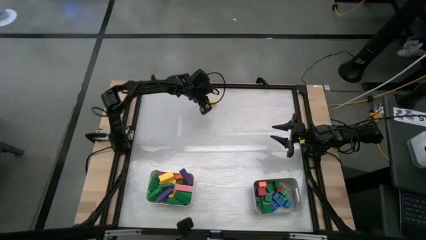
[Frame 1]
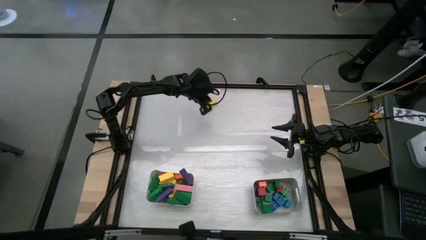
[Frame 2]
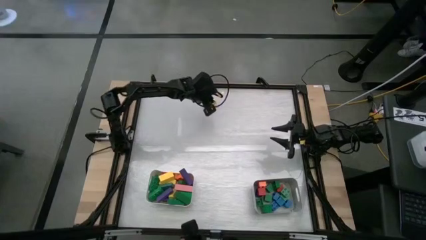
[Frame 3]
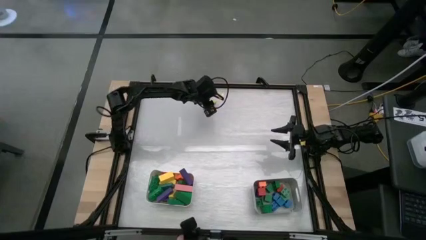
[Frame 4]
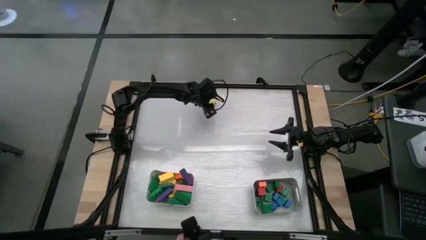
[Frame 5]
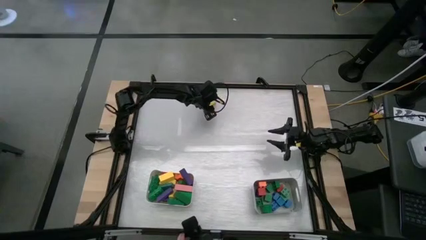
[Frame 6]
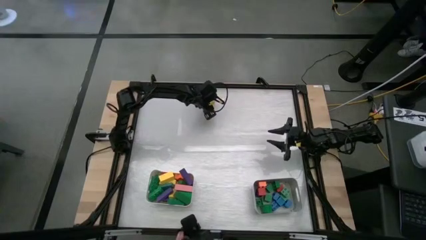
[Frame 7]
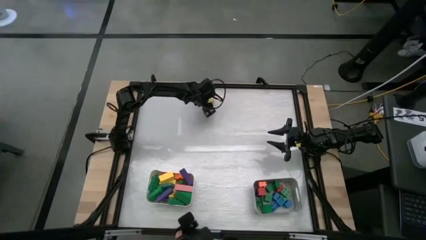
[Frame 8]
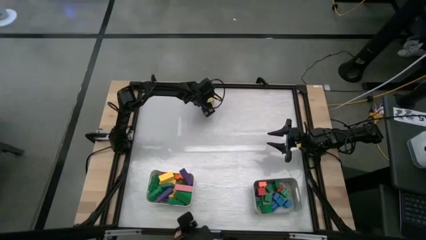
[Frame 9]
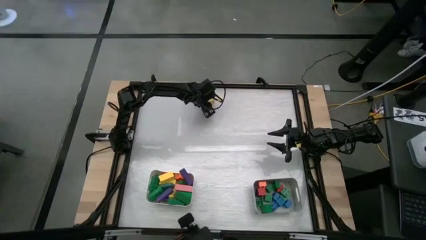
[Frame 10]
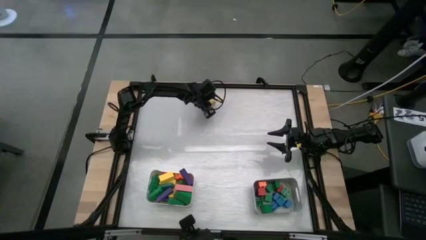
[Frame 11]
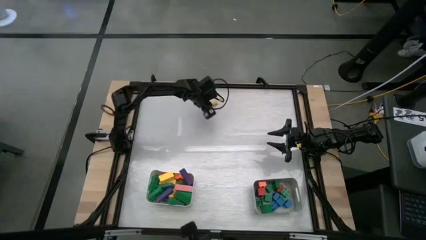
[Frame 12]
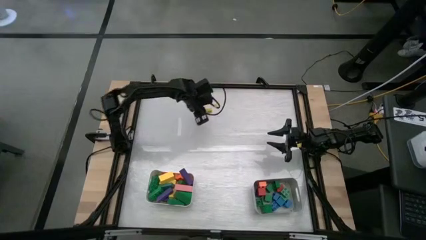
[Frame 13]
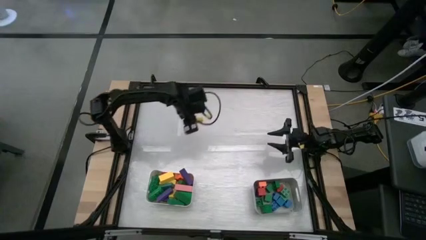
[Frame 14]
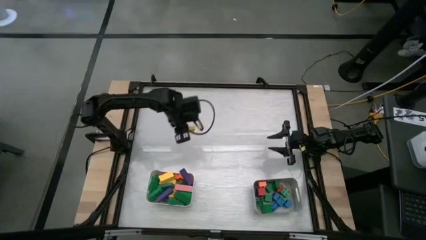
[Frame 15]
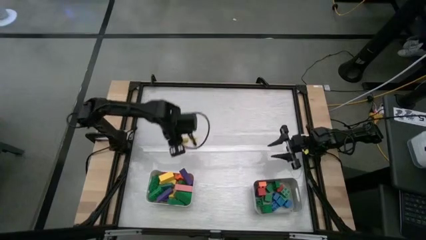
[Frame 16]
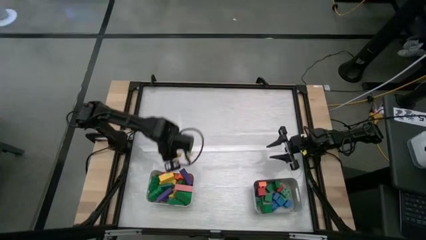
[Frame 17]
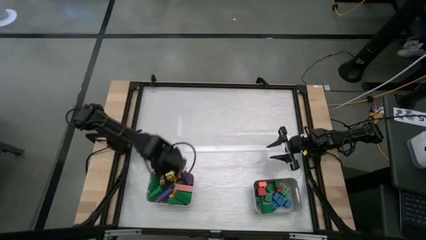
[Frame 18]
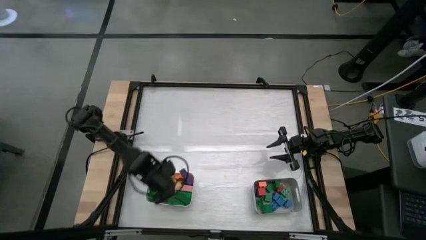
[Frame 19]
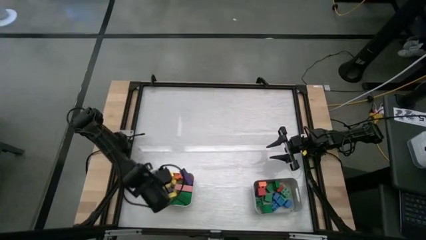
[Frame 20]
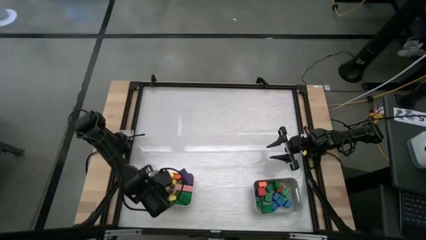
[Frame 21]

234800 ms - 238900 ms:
Task: Sort blocks by size
Put the rectangular yellow block into the white bin

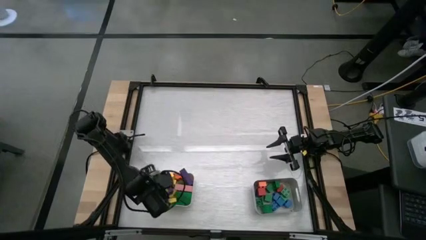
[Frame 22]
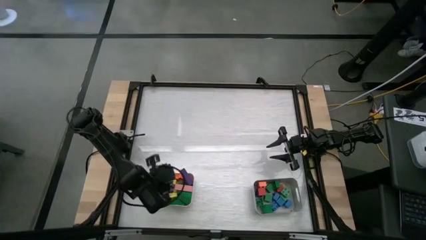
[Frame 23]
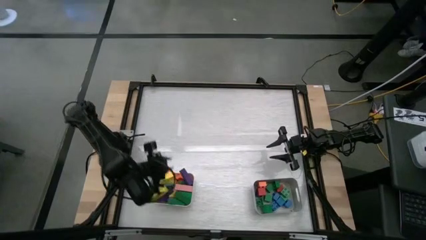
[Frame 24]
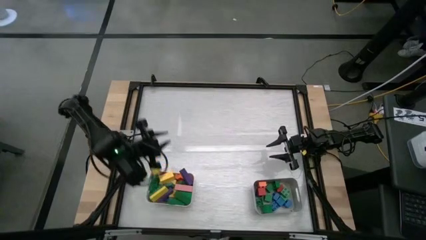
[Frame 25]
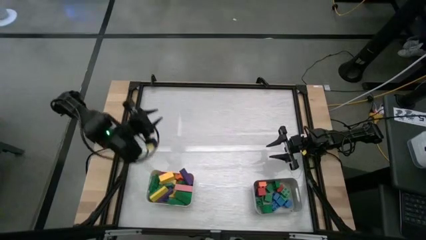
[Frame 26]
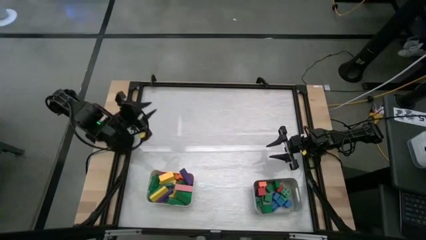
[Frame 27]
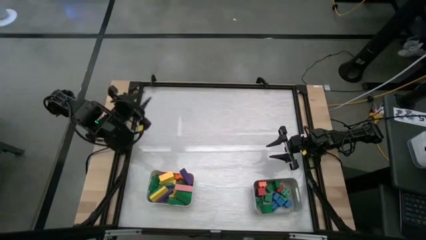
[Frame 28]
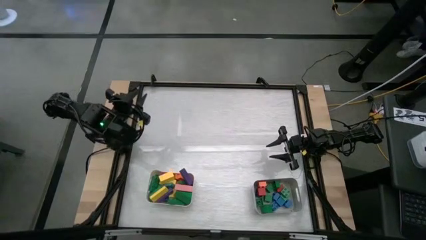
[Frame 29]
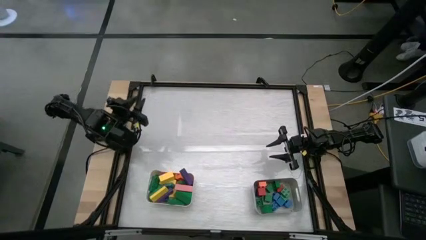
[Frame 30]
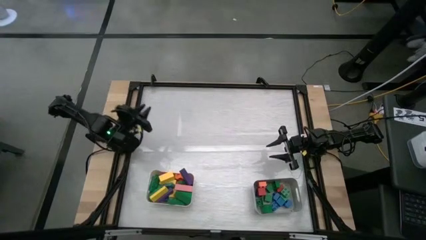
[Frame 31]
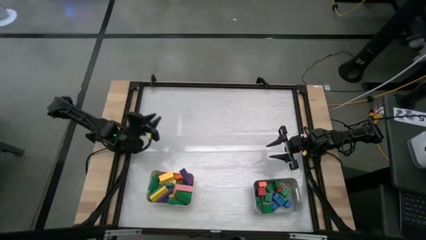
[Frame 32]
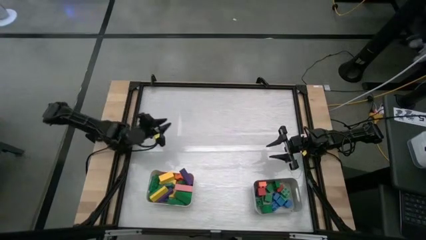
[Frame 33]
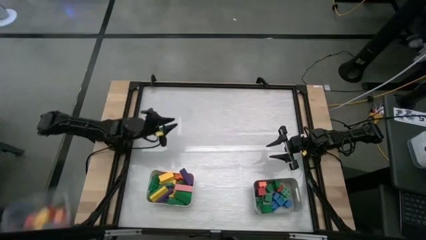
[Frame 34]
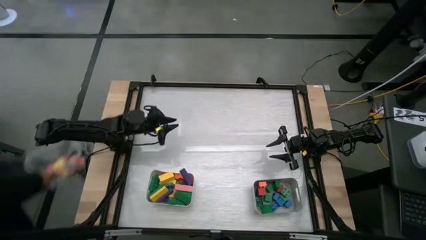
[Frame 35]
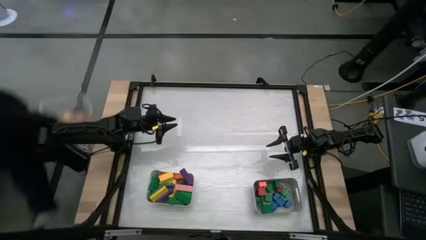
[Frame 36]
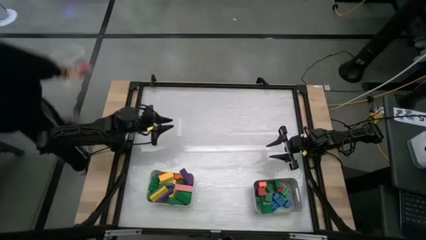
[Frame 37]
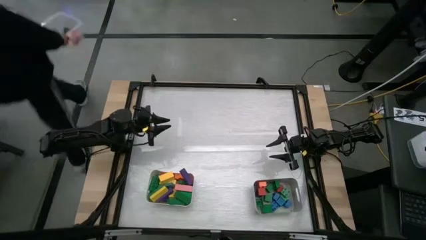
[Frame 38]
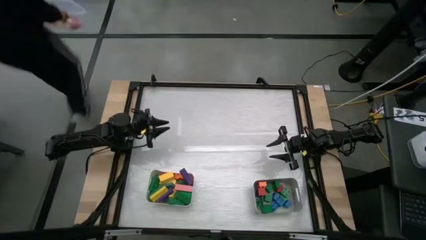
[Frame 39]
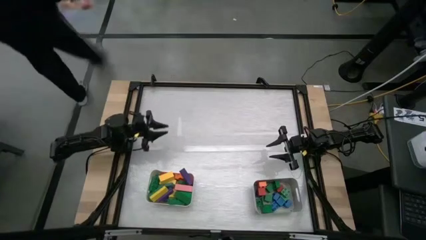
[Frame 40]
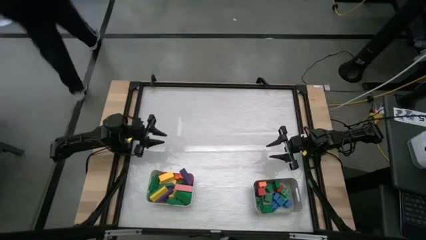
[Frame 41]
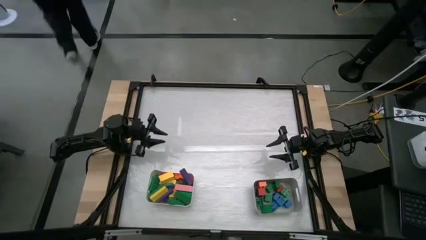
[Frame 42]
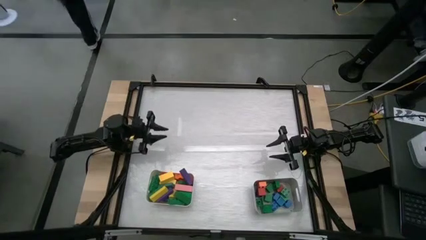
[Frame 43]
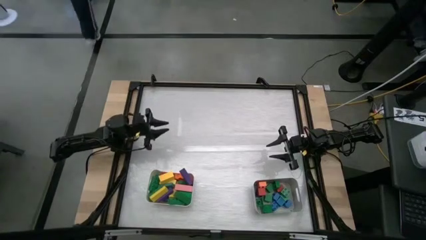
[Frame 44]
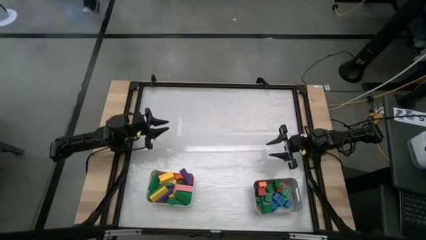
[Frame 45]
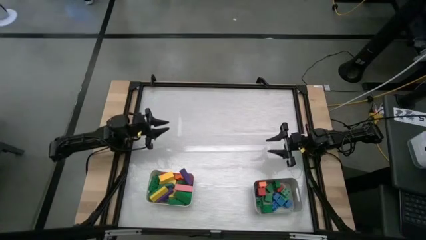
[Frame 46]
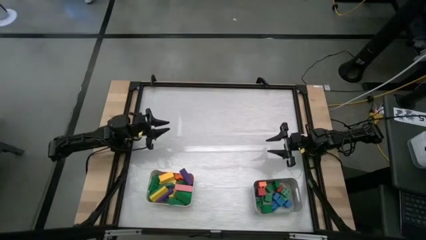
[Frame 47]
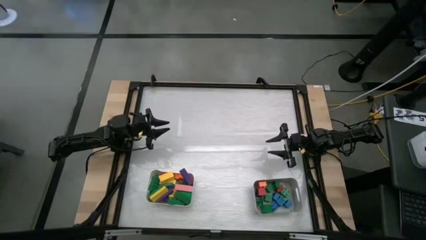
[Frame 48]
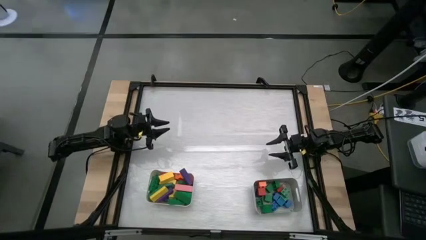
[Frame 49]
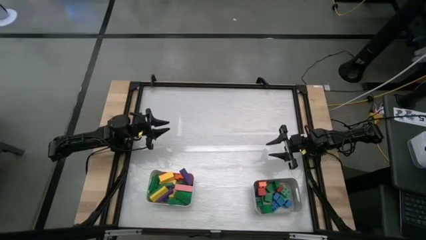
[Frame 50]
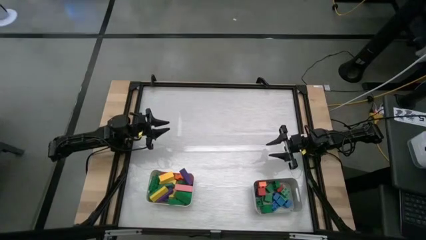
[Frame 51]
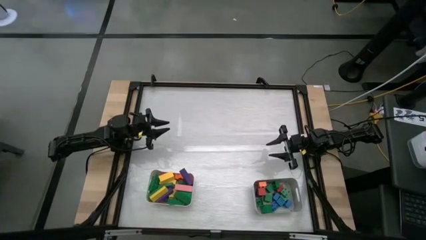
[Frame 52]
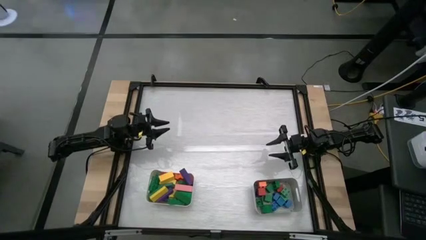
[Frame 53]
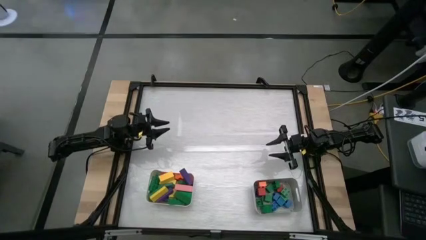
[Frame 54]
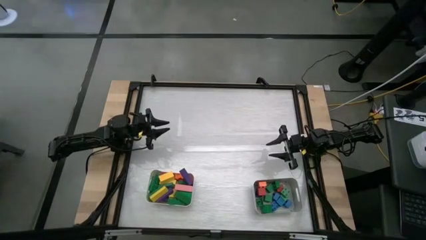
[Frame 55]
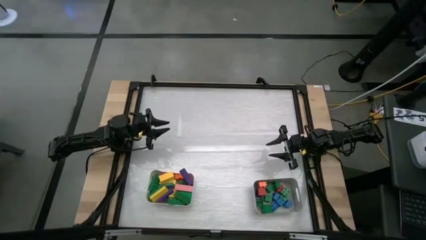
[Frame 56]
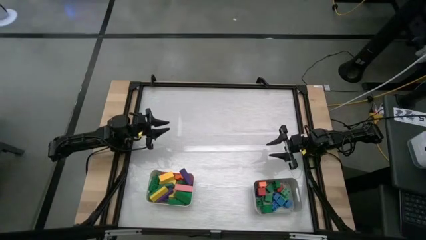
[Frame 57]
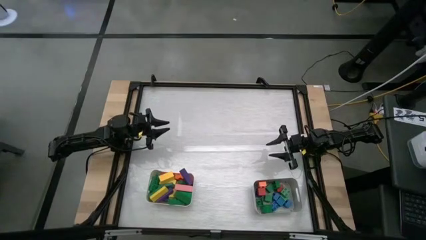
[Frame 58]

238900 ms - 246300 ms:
Return to Home Position

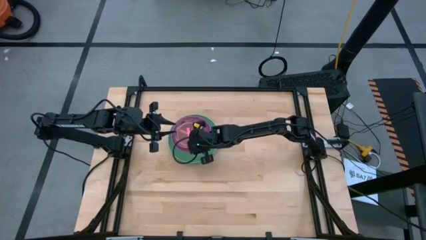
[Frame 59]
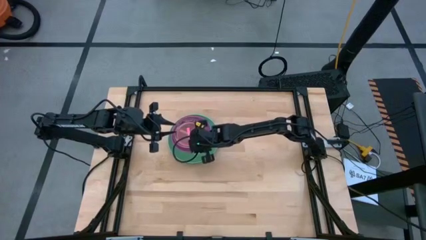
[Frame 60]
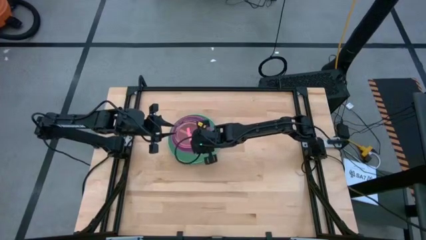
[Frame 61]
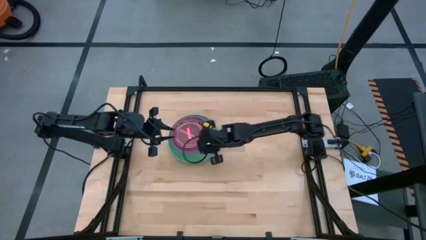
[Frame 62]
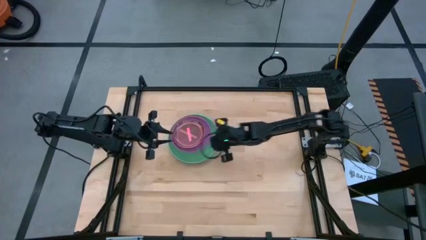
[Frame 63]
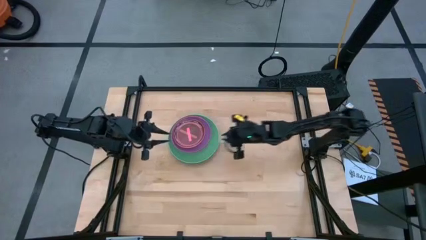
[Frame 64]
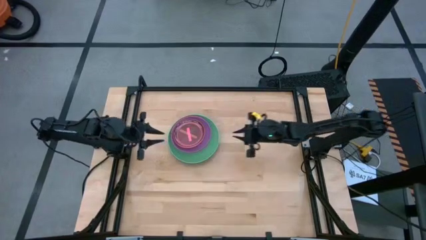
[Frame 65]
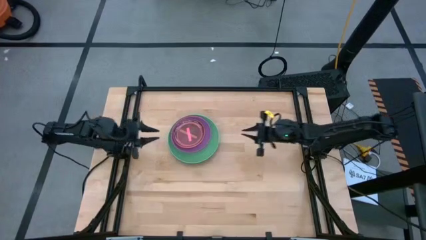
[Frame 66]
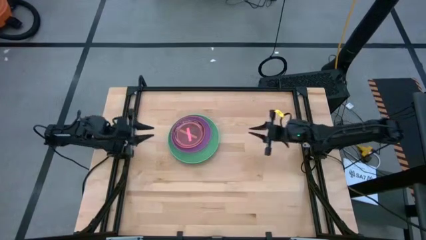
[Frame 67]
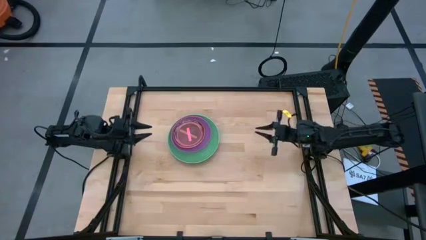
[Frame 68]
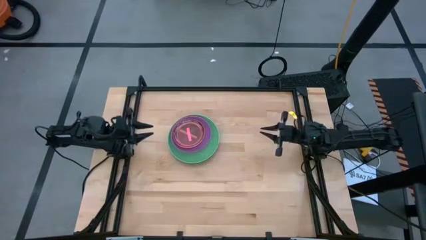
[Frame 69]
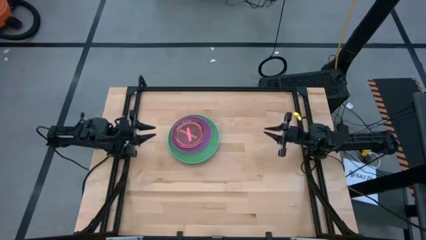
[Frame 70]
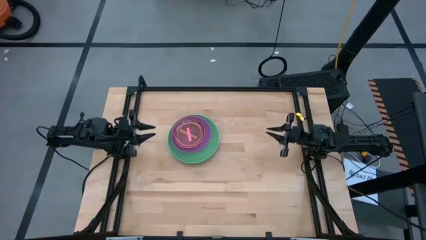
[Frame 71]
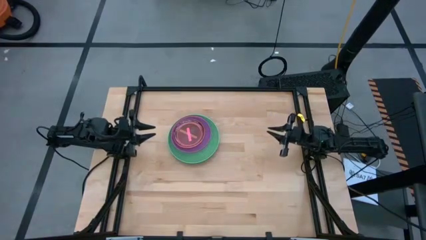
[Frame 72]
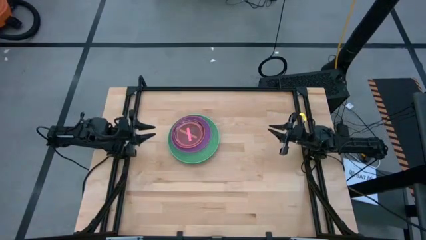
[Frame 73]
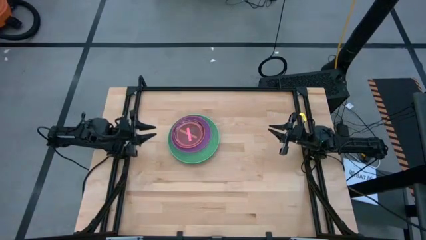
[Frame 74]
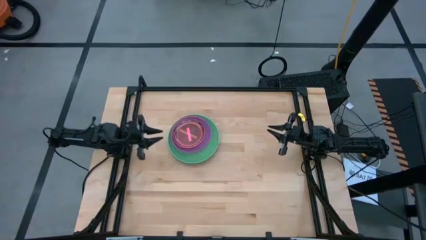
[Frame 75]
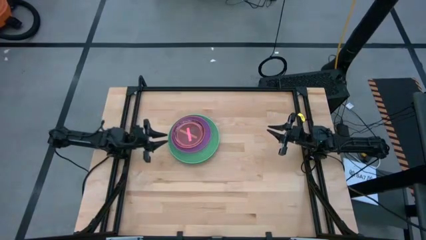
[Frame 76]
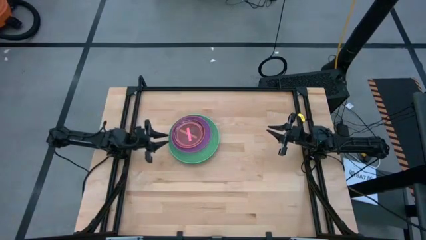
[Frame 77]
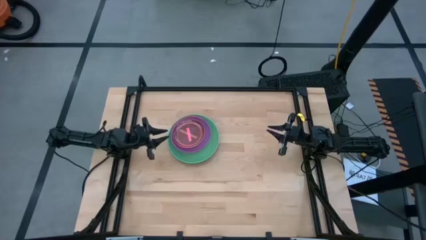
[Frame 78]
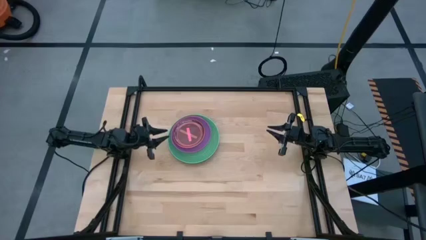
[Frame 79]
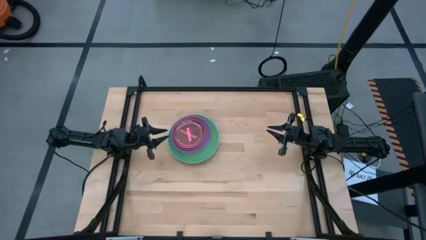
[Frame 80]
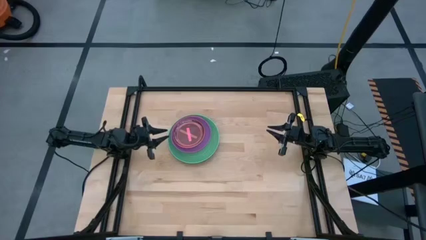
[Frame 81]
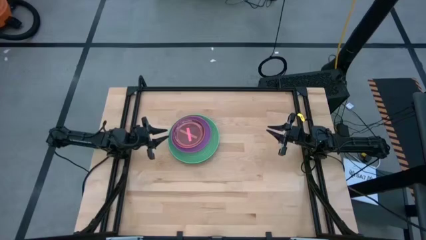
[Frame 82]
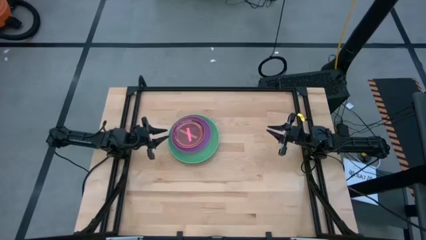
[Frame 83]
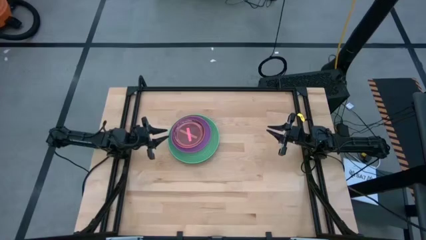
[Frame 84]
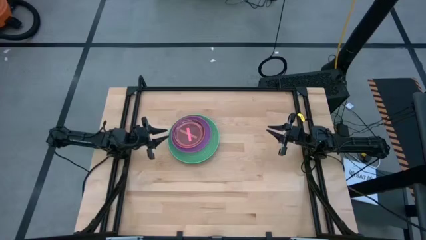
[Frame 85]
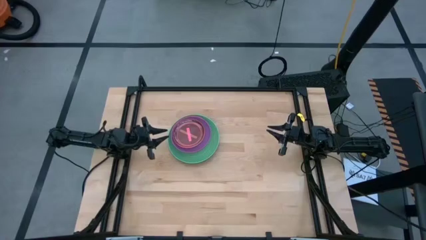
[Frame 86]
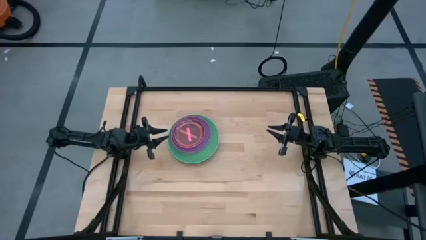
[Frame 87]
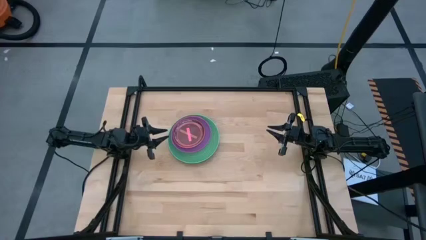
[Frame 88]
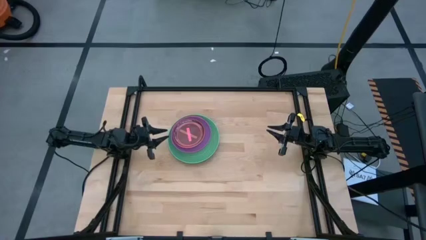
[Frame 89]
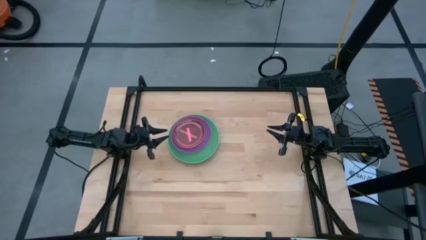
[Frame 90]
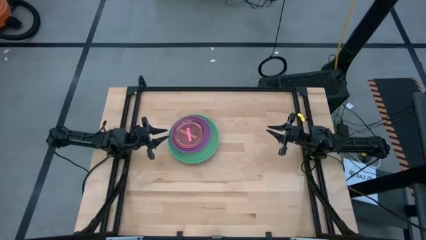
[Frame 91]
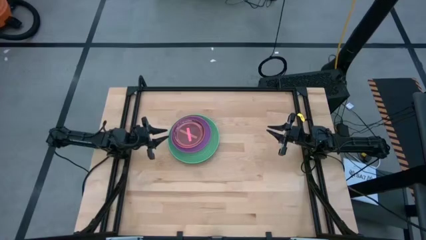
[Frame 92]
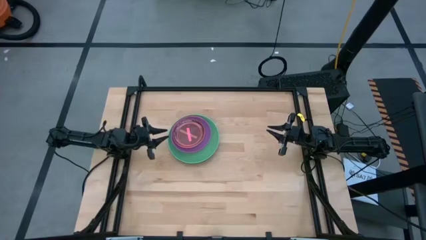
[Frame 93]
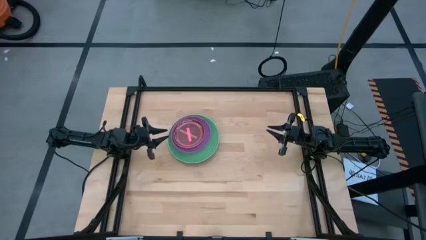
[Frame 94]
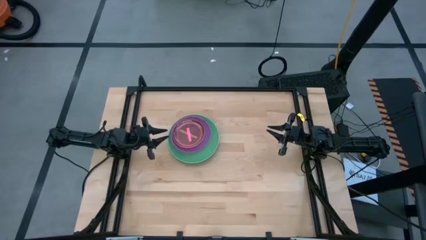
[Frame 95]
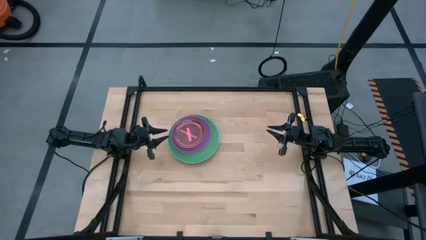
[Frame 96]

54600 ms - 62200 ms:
Task: Stack plastic plates
Return to Home Position
